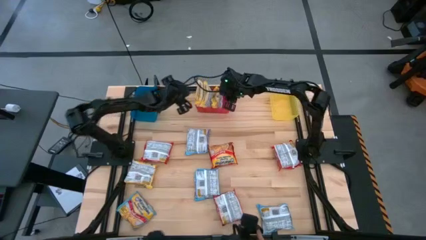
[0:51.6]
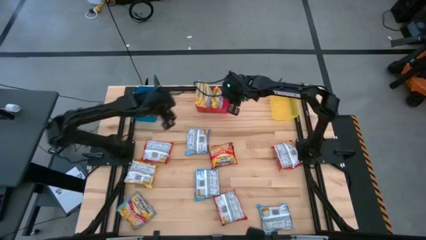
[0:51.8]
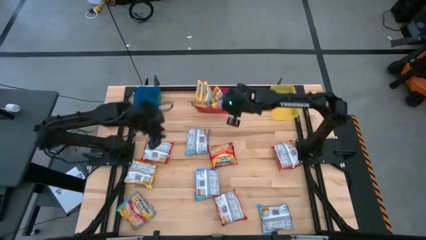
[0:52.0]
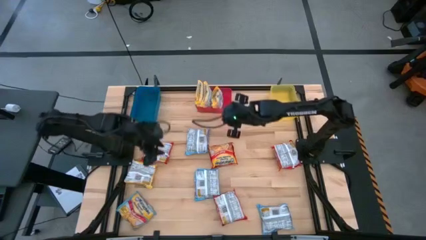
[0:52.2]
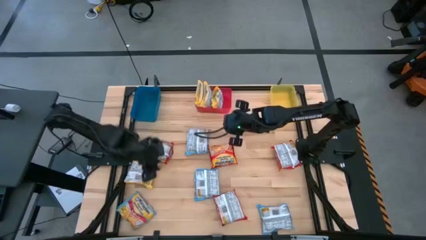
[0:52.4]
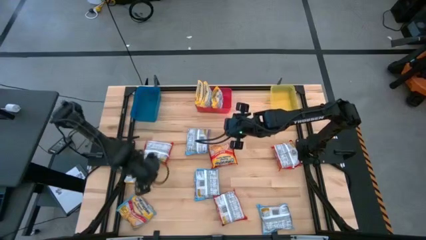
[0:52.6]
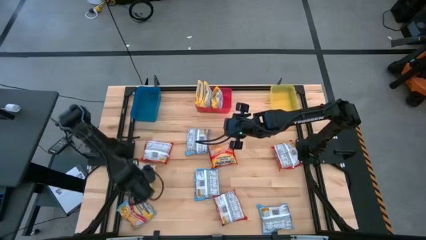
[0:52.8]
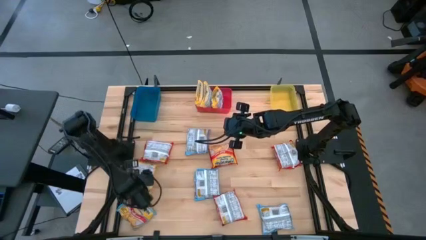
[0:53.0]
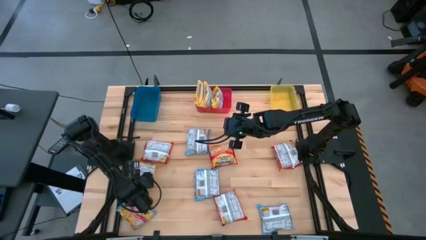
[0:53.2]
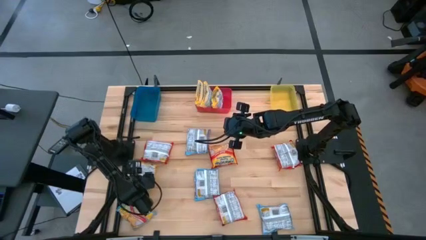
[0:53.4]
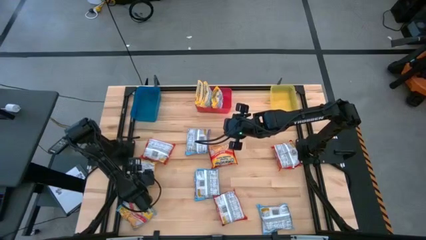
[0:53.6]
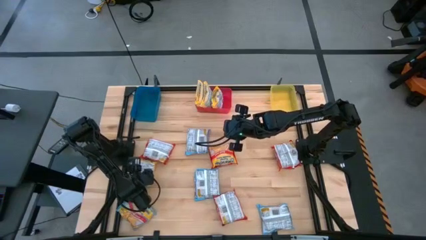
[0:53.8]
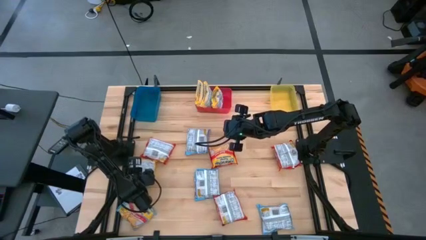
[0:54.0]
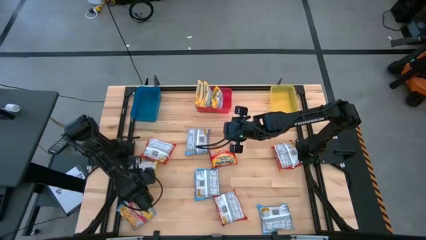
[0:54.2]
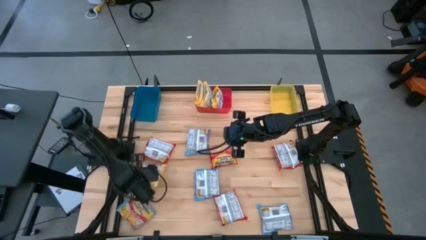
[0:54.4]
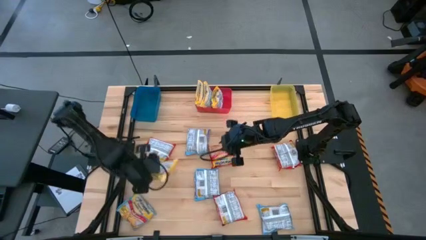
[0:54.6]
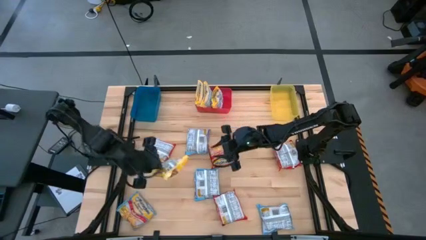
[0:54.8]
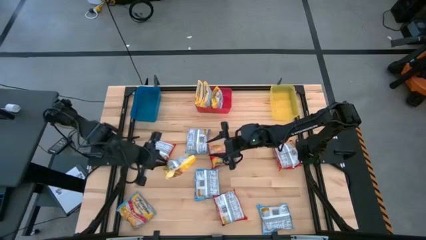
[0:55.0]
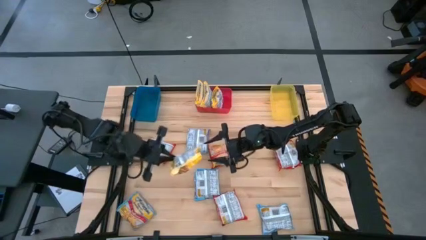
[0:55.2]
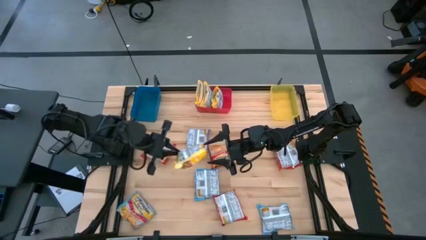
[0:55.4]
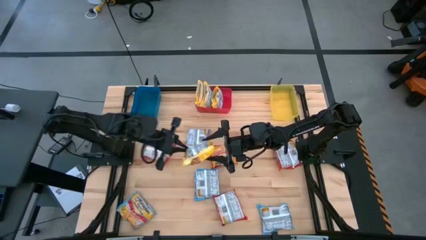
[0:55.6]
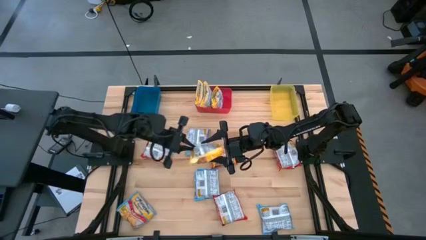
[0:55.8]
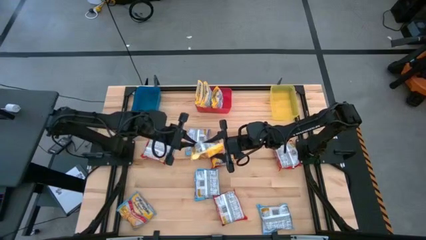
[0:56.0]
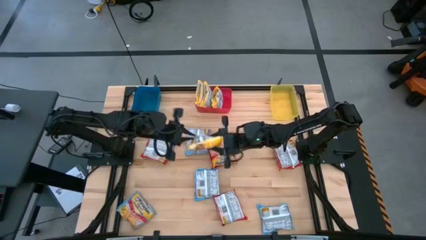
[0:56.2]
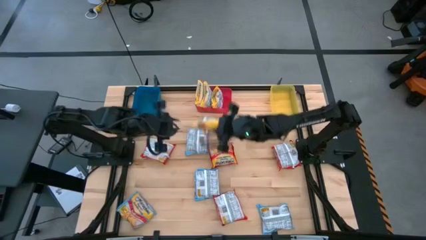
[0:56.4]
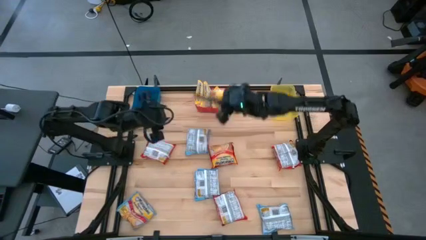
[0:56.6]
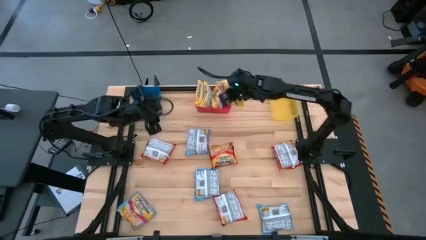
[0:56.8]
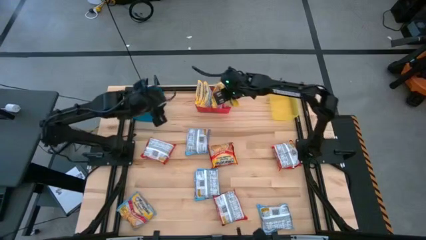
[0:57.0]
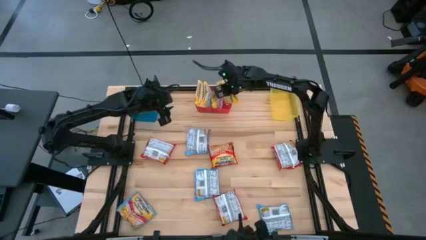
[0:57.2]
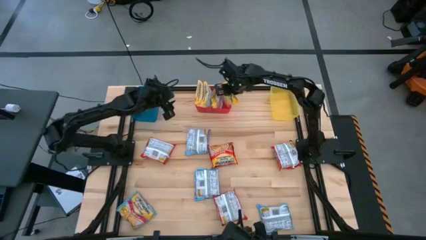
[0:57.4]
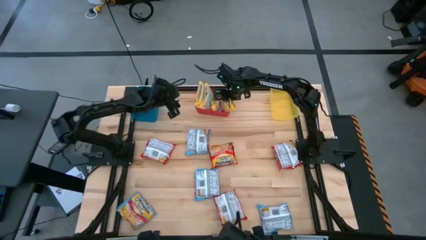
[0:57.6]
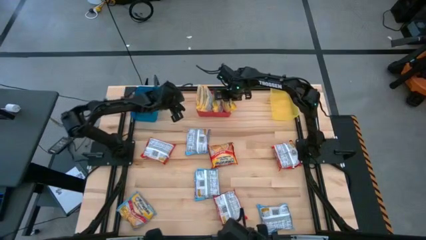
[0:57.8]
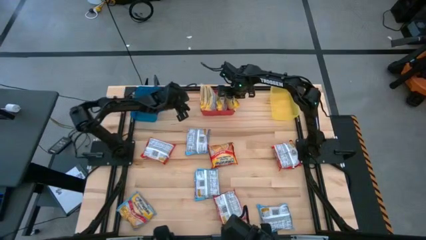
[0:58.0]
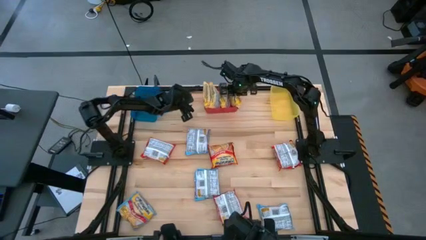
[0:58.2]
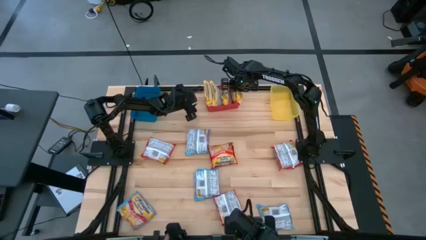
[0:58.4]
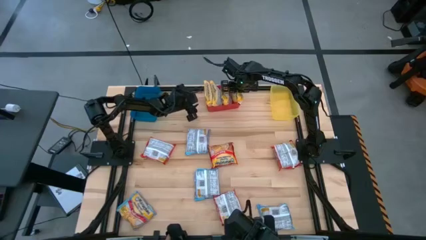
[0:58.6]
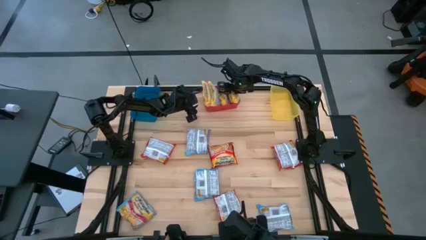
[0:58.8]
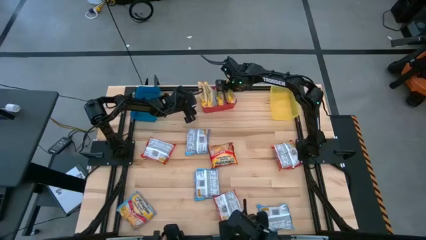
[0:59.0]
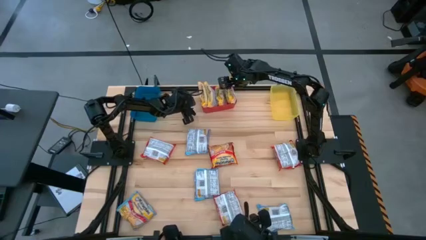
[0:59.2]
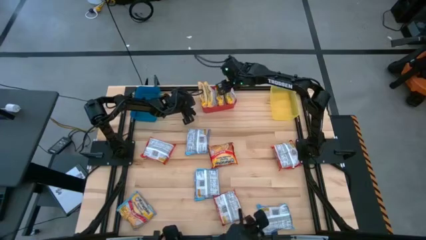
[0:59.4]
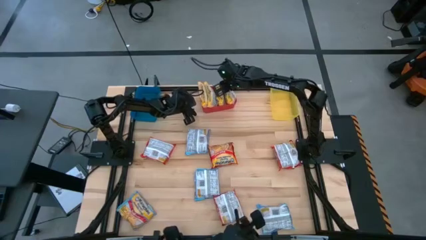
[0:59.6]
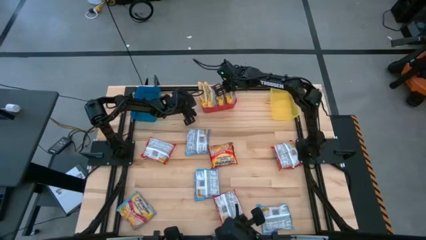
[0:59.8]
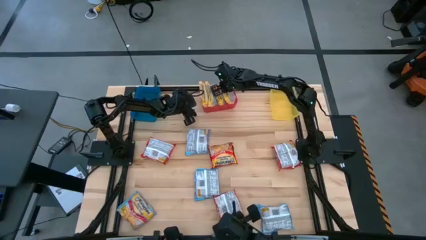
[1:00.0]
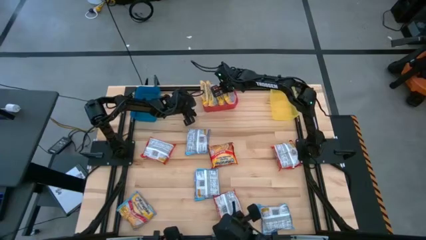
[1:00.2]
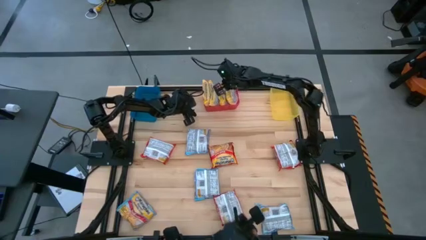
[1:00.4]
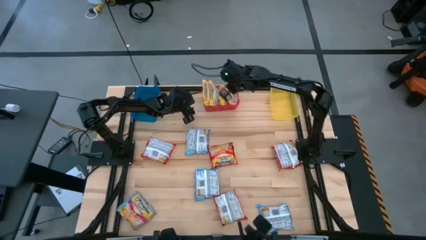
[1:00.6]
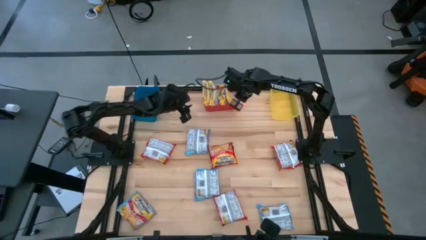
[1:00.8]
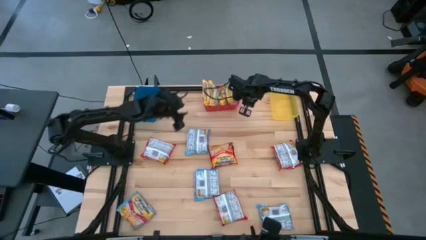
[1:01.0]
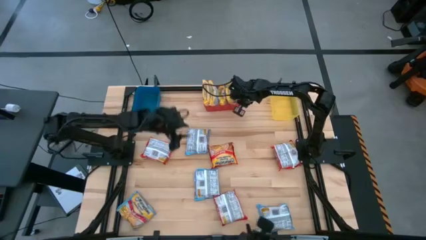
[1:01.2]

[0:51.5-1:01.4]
Task: Sort Maruchan noodles
Put the yellow noodle pack into the red bin

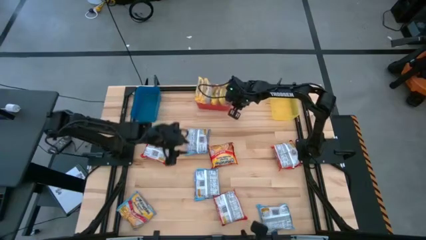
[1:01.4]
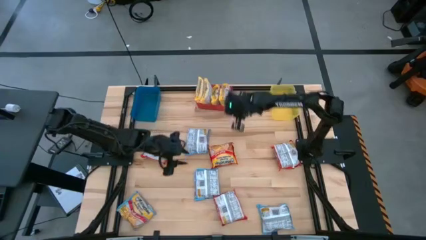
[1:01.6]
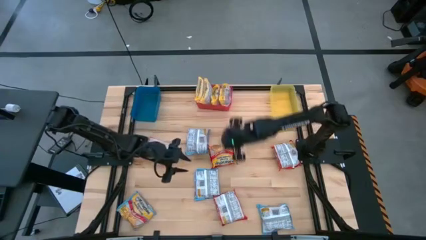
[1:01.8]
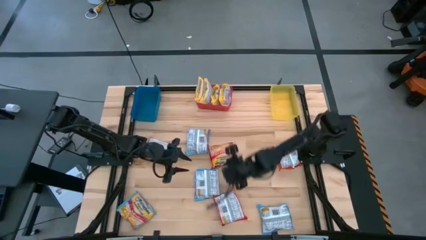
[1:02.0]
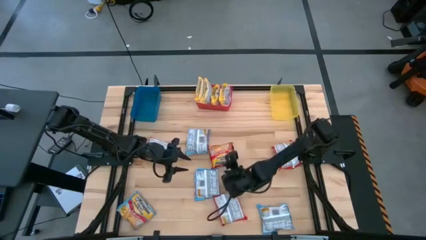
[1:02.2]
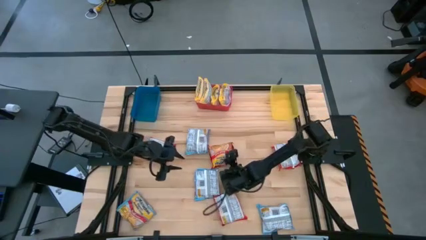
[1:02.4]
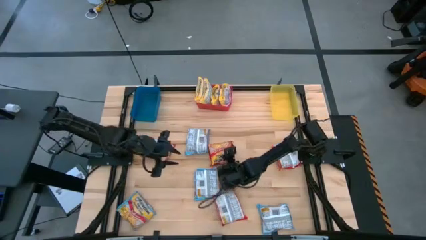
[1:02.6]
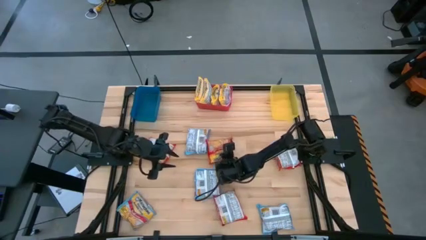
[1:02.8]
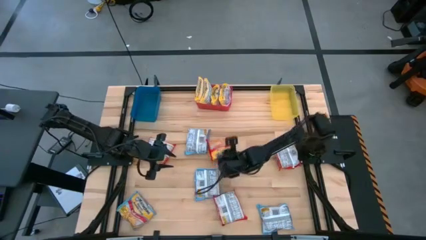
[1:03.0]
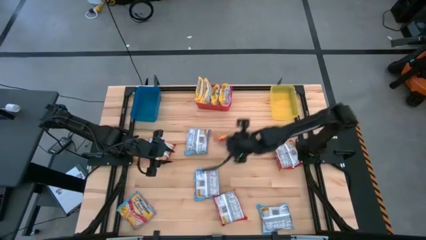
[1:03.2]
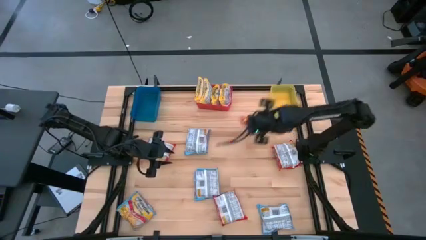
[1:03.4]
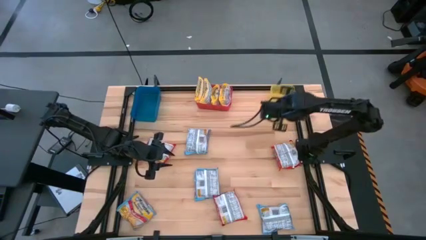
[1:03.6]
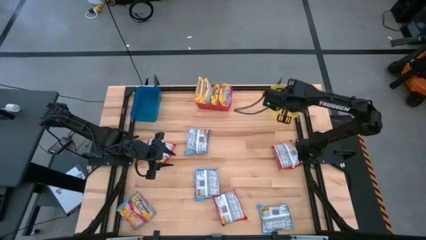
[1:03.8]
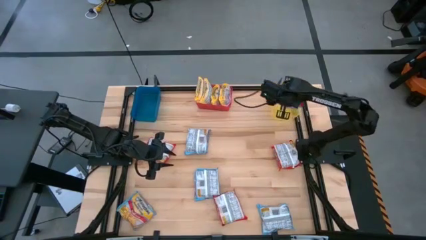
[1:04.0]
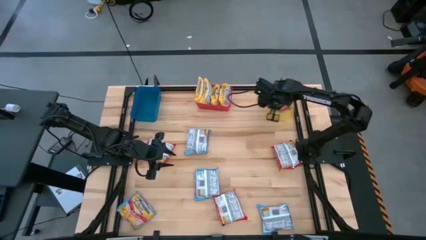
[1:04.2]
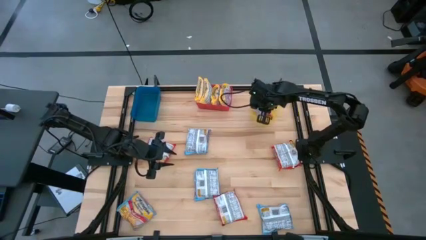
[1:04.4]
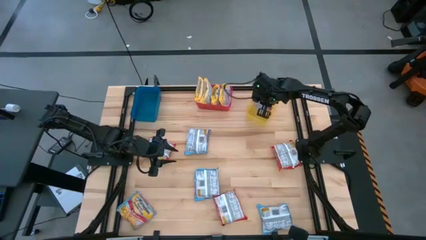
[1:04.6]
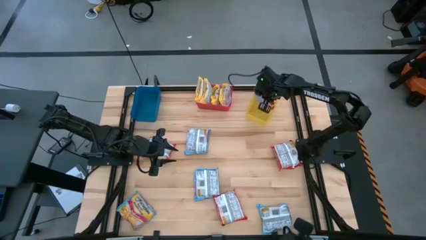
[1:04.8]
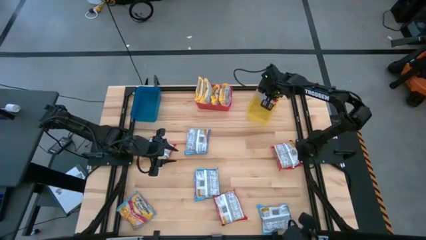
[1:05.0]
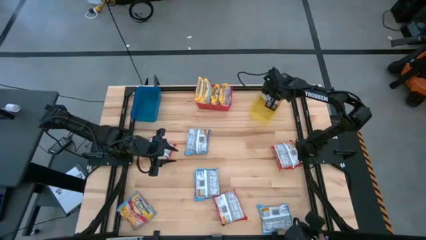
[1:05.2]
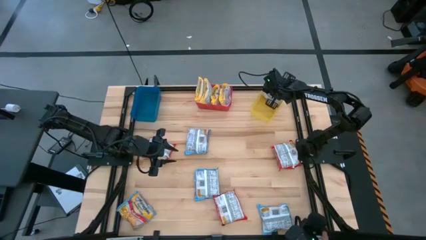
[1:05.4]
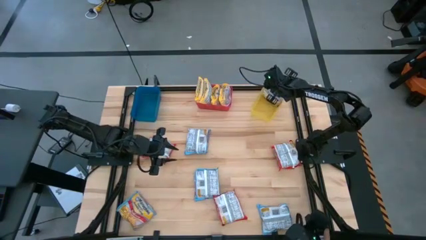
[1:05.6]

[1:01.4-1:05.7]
Put the red noodle pack into the yellow bin

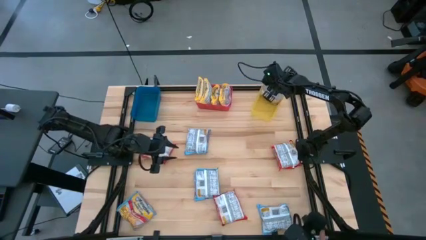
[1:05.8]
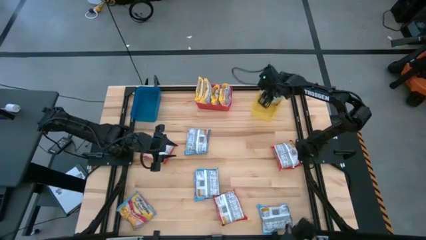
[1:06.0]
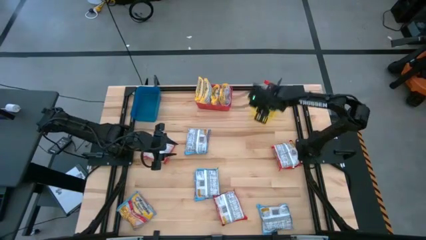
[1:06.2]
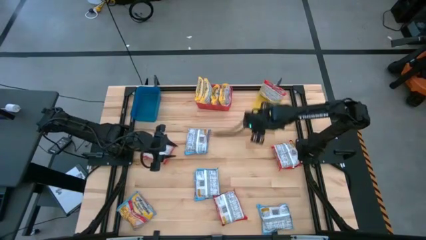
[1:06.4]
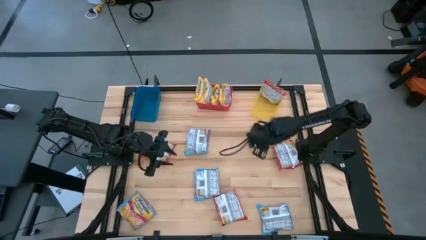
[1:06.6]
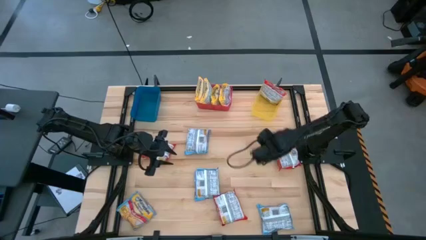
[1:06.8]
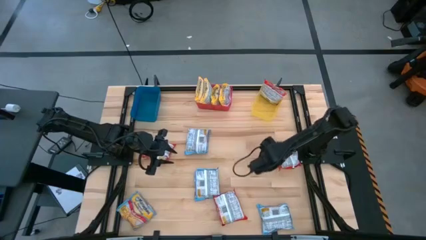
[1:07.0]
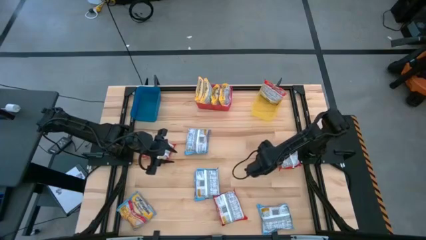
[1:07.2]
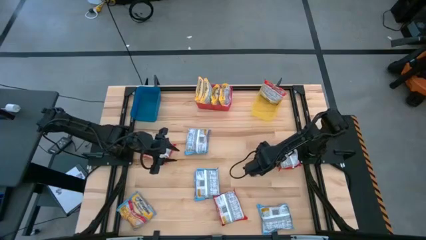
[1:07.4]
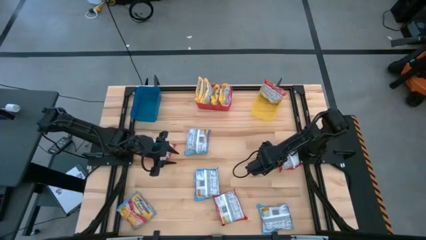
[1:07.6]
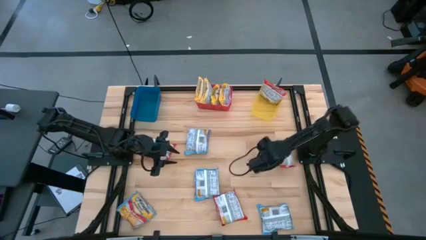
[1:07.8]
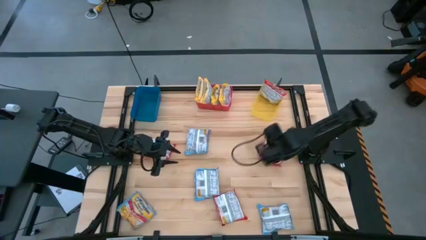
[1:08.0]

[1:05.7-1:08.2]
Put the top right red noodle pack into the yellow bin
